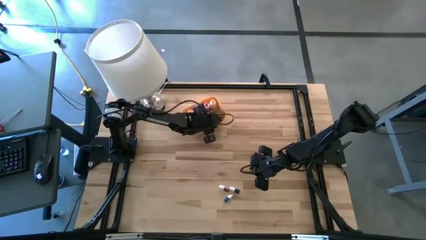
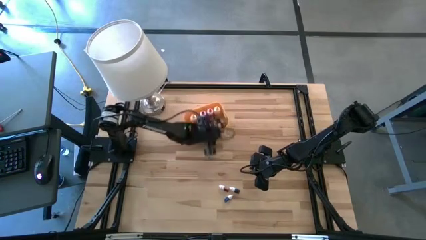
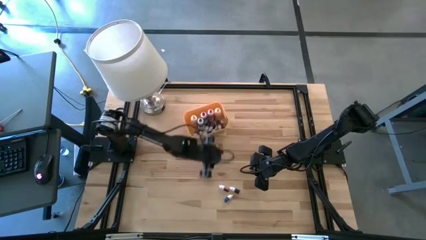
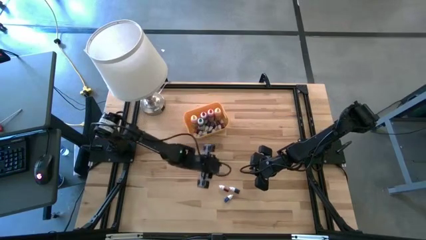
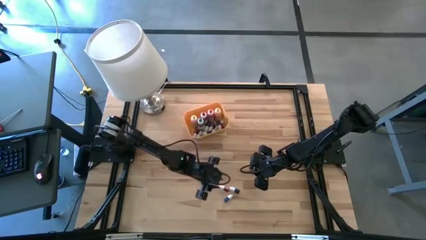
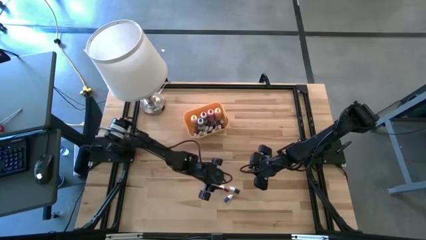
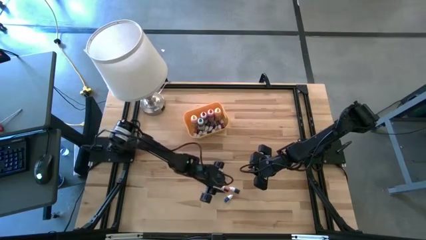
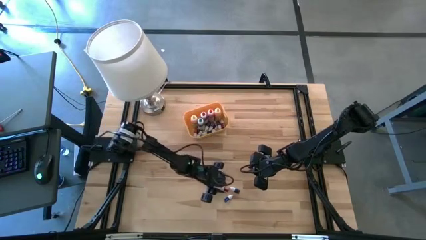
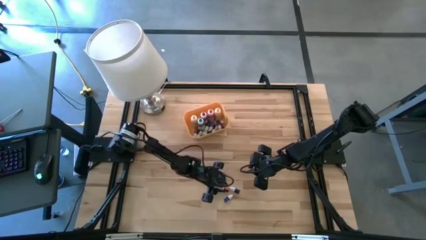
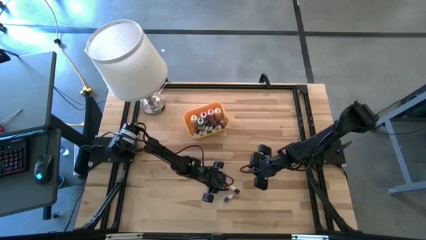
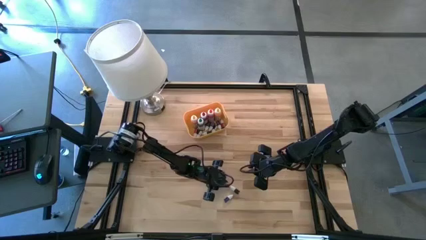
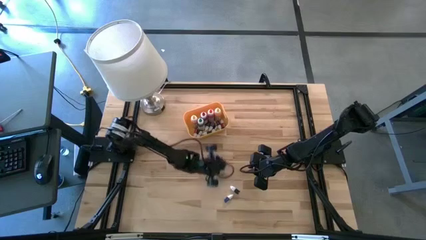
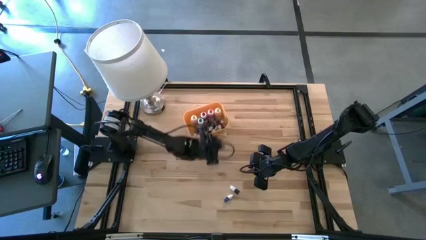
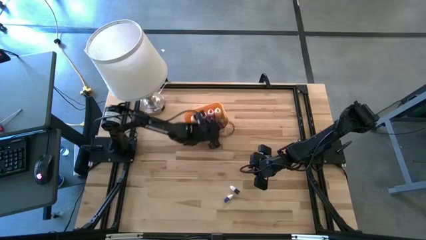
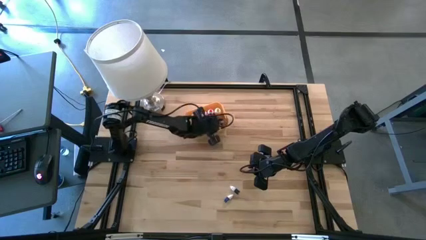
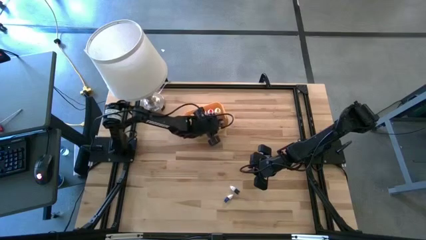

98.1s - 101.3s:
Task: Pick & Place food coloring
Put the small orange food coloring bottle into the bin

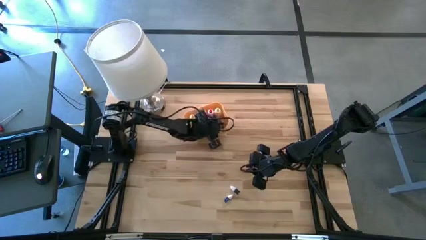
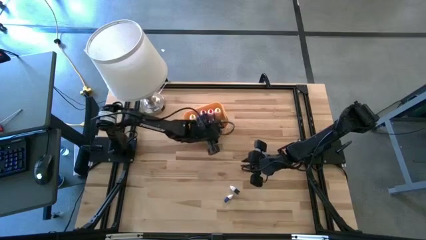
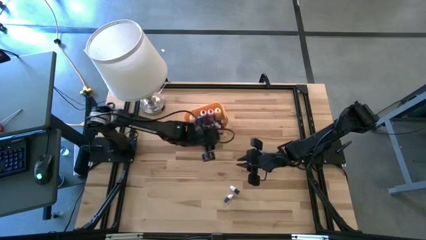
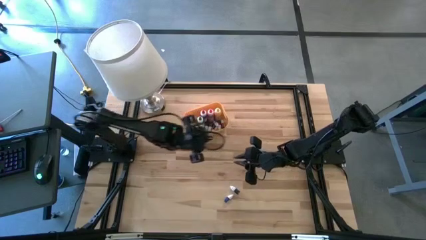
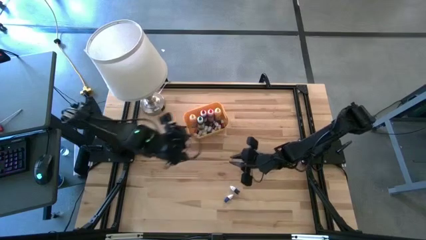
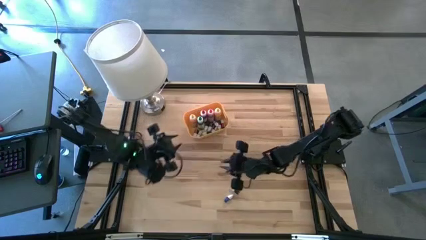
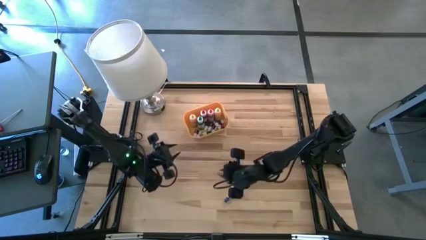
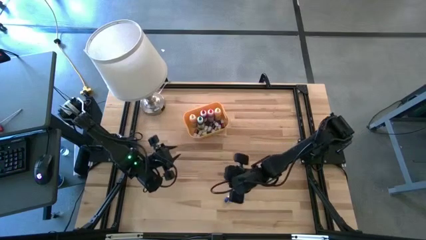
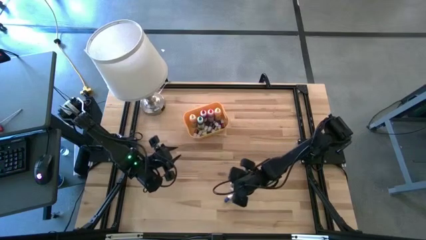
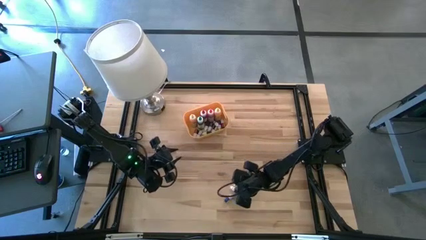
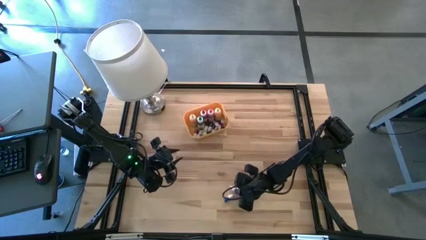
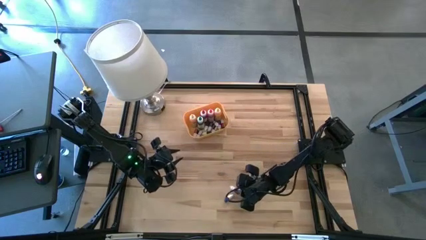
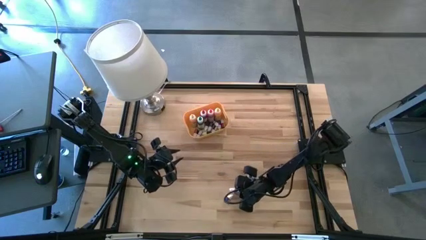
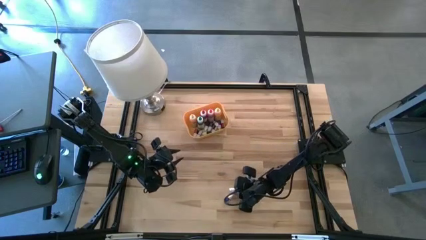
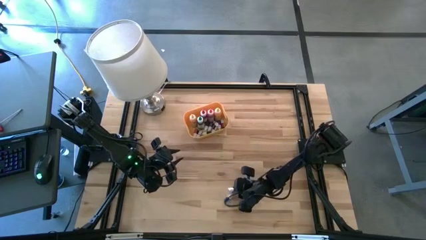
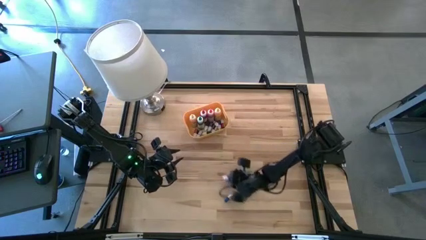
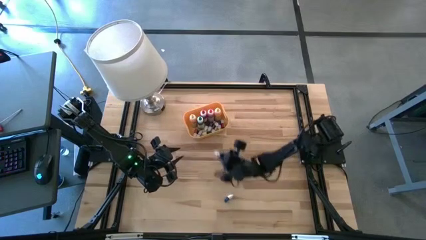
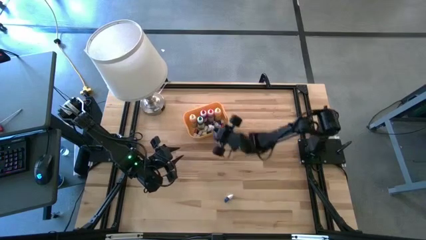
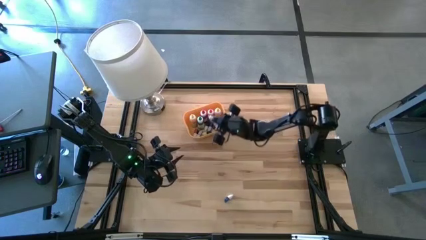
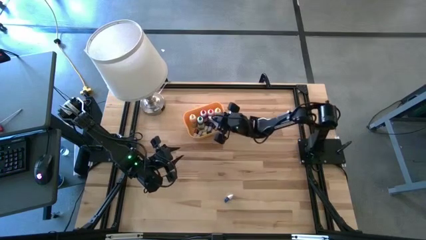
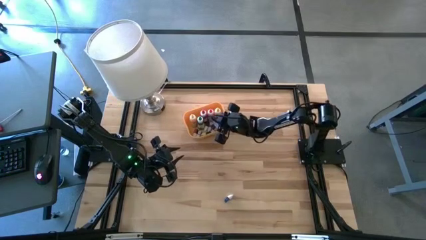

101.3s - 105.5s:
Put the small green food coloring bottle into the bin

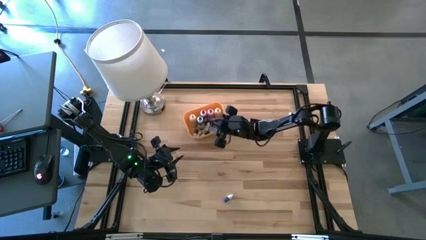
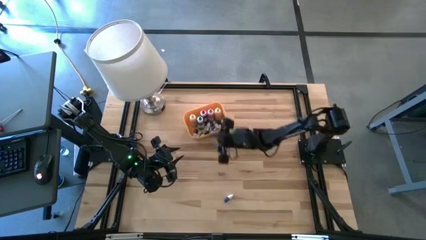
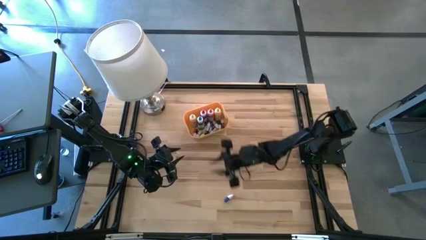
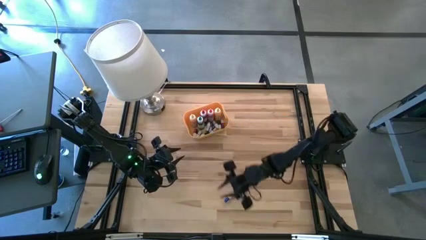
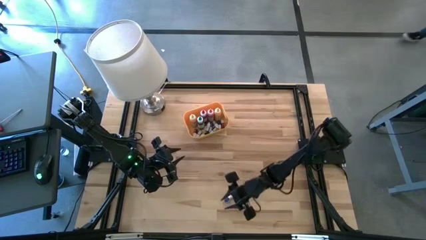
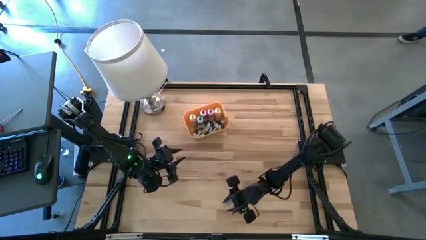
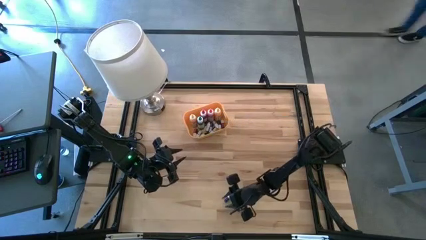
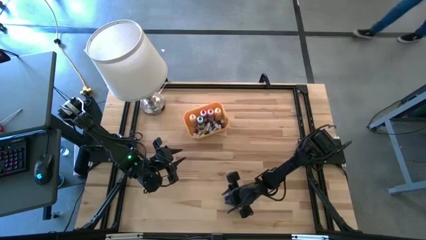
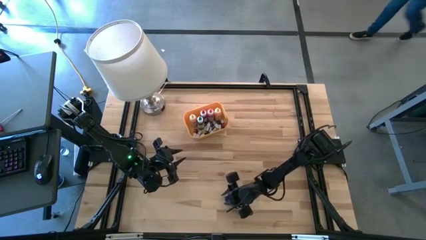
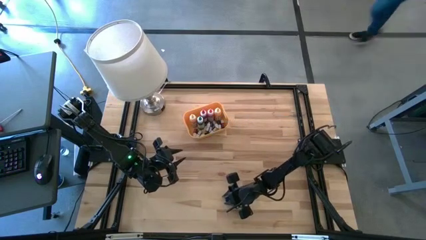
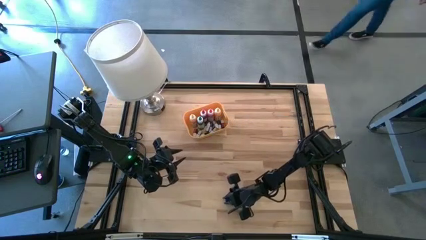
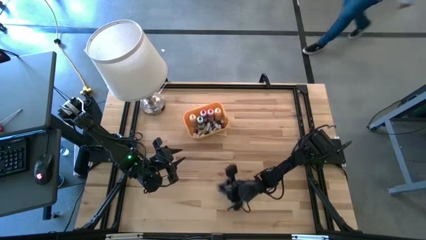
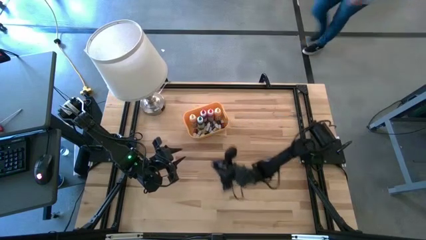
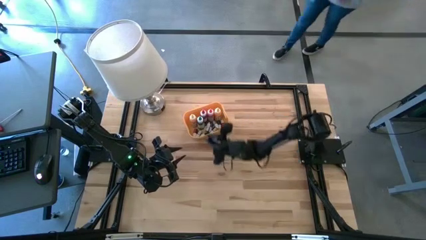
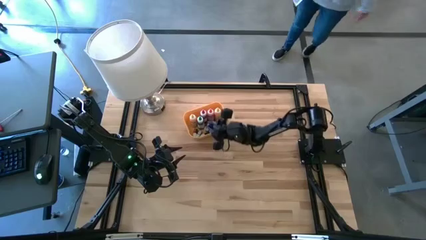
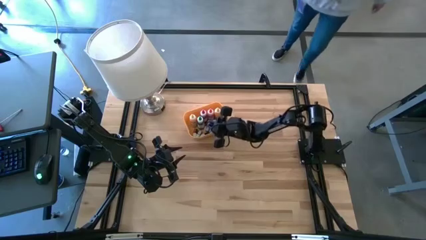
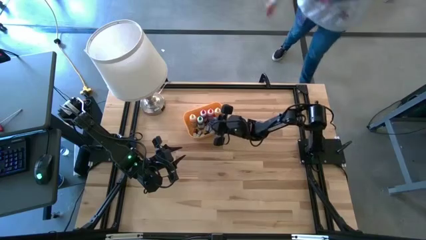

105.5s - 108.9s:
Put the small dark blue food coloring bottle into the bin
